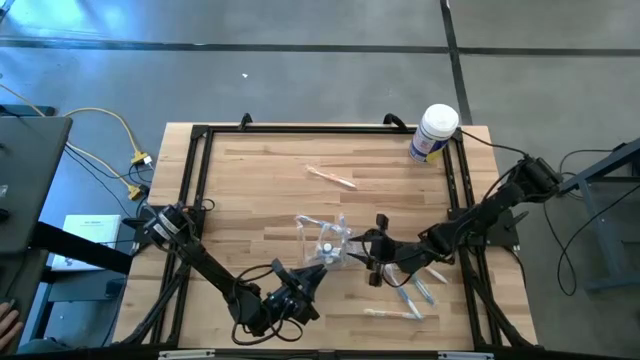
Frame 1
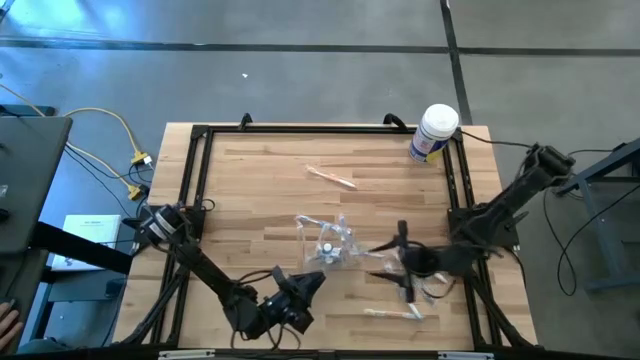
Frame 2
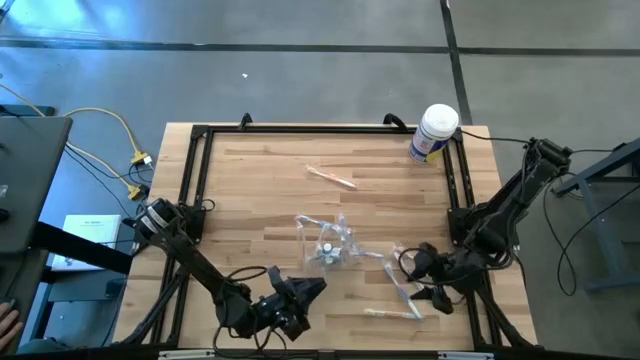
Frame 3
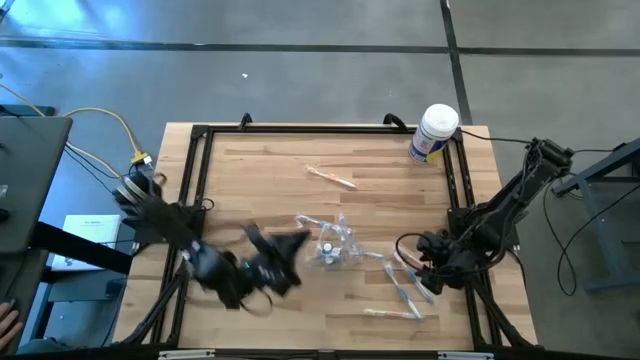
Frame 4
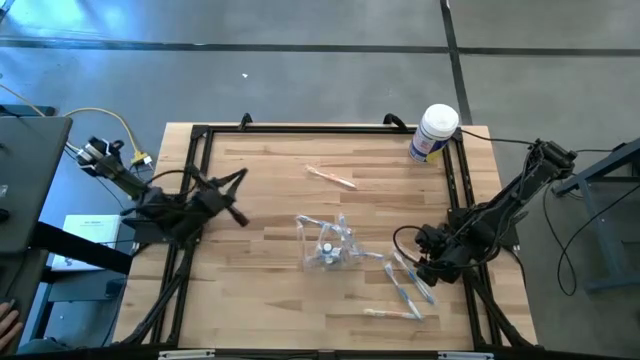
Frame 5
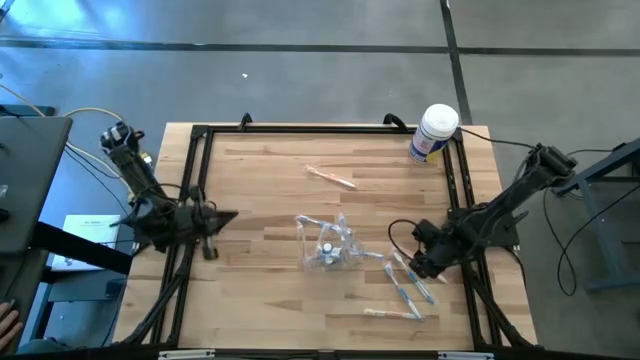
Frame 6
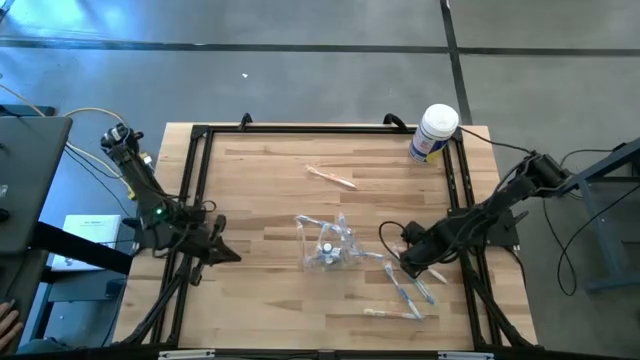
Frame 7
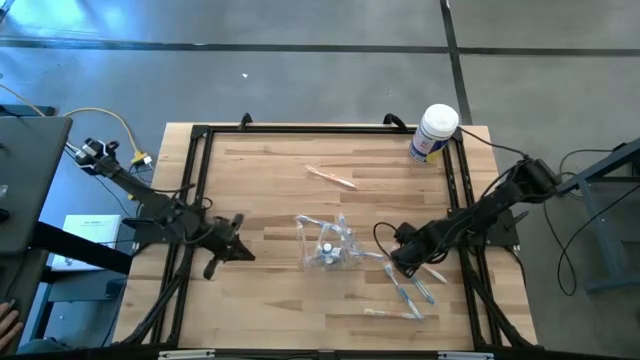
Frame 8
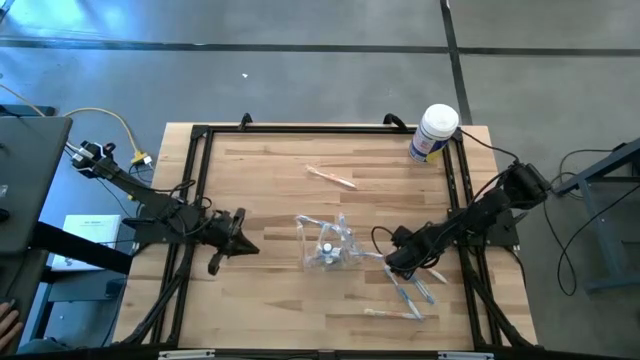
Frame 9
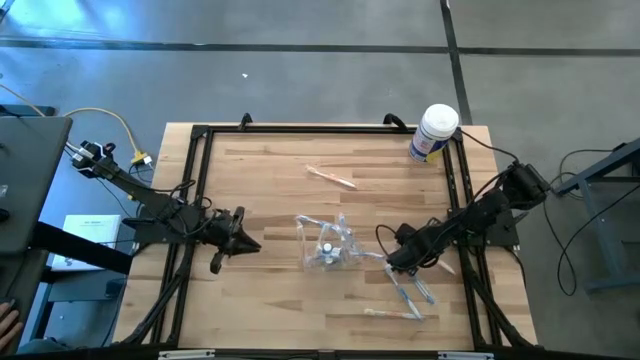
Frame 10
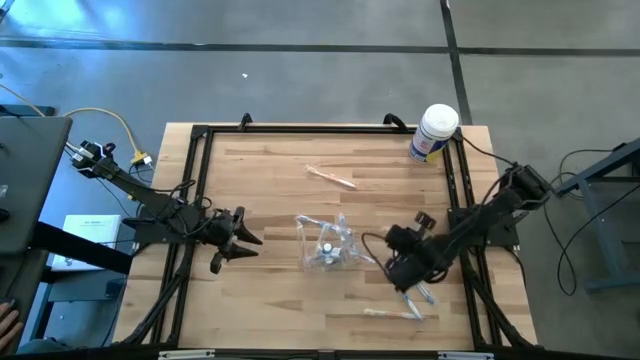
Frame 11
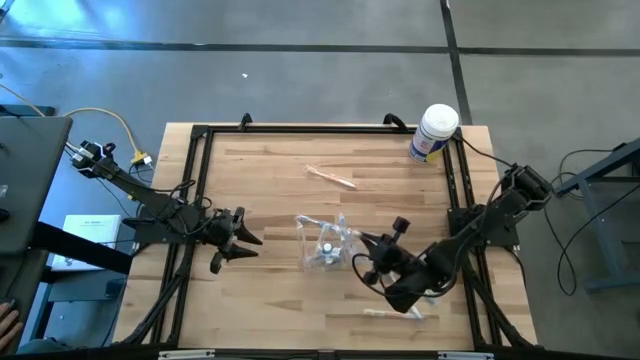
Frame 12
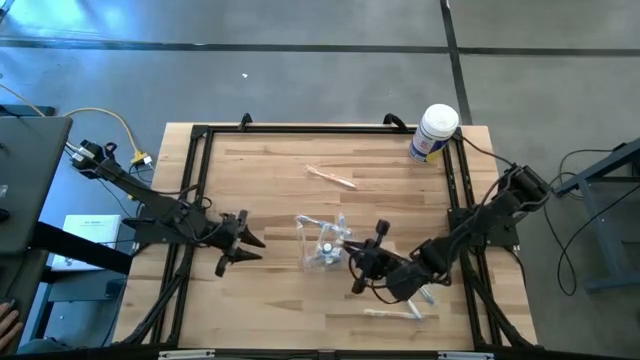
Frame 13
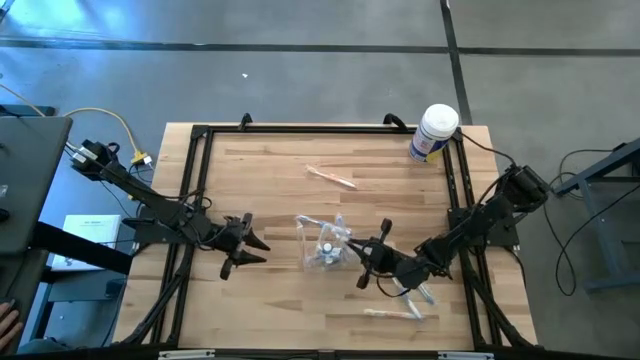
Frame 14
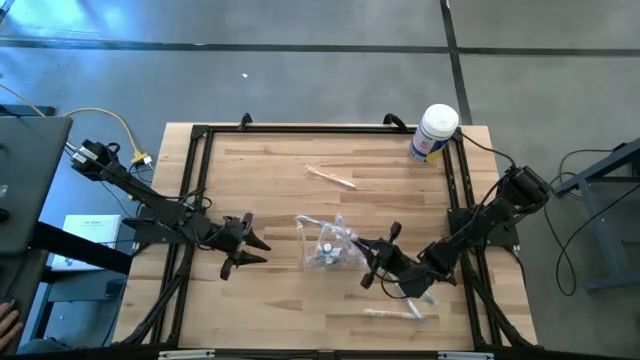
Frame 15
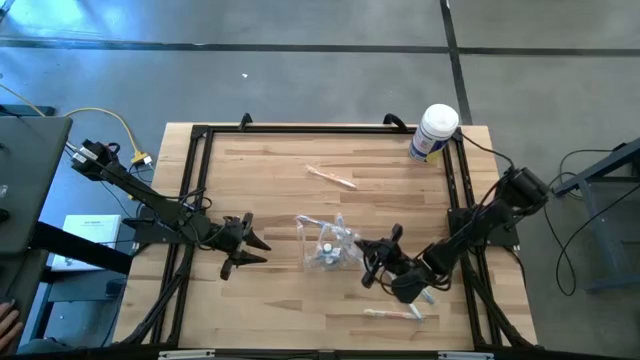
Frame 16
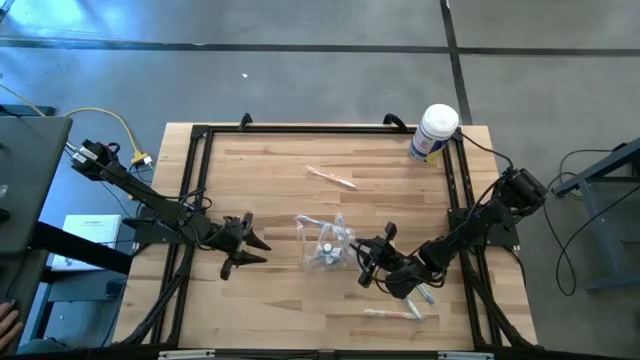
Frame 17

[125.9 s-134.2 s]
Task: Pick & Place toothbrushing station
Put the orange toothbrush into the transparent organizer

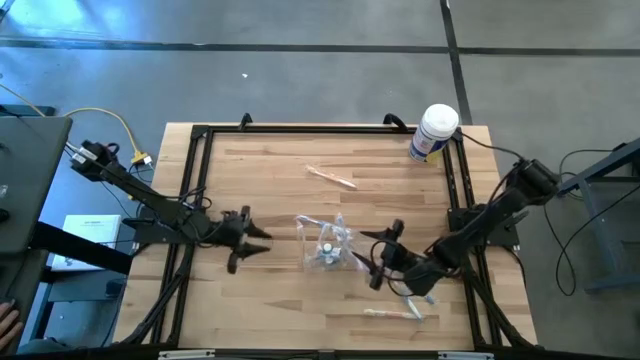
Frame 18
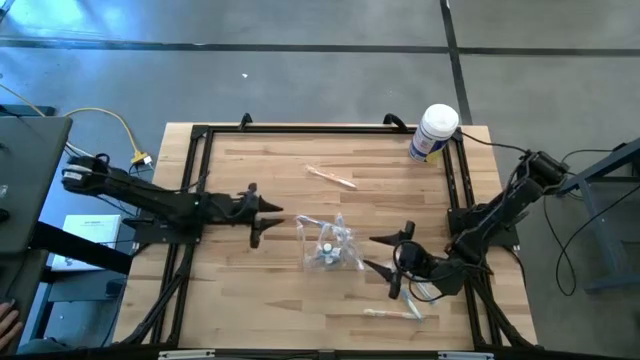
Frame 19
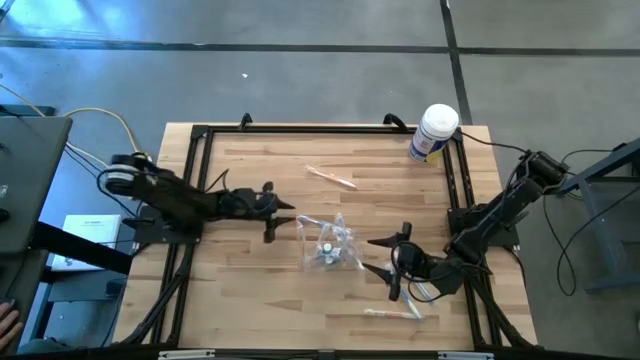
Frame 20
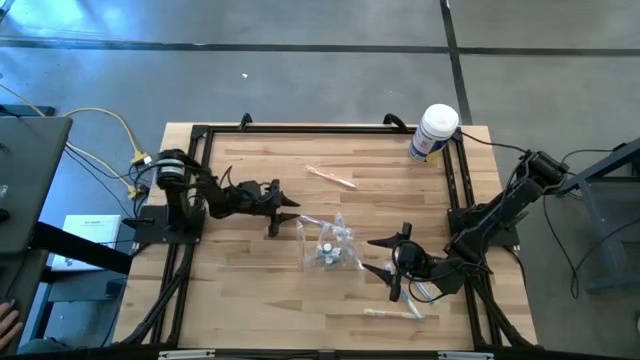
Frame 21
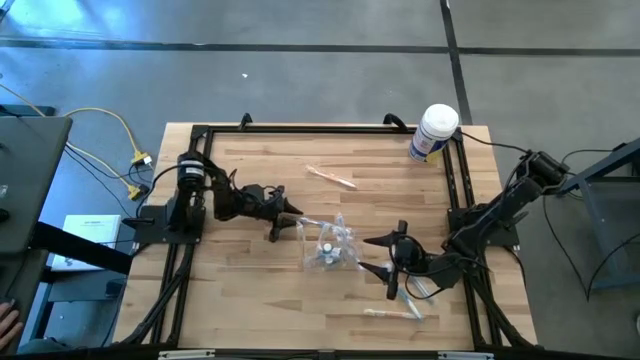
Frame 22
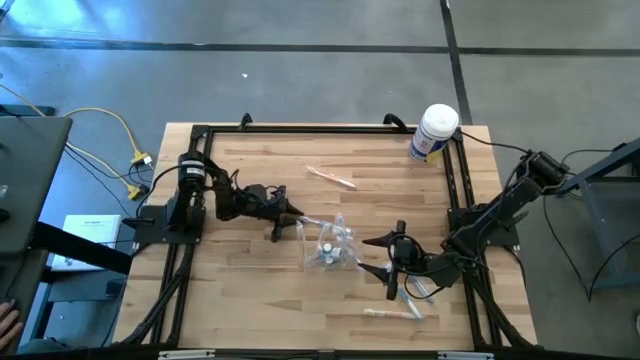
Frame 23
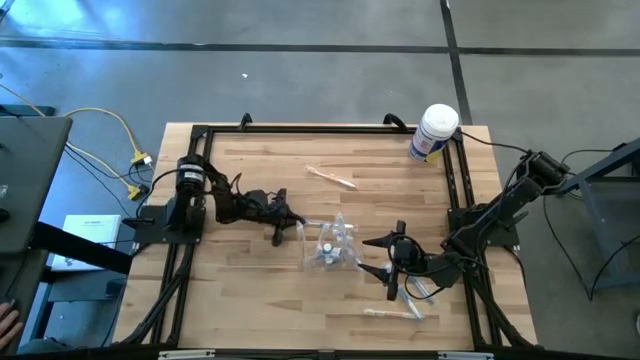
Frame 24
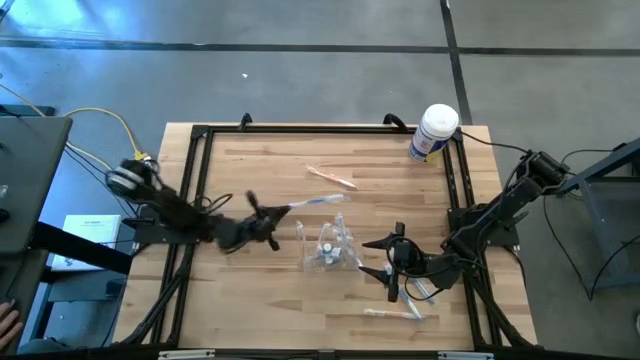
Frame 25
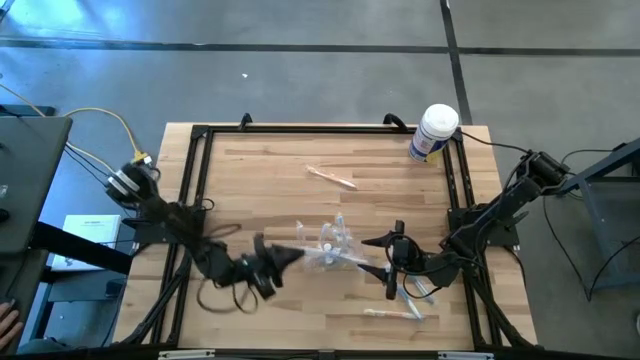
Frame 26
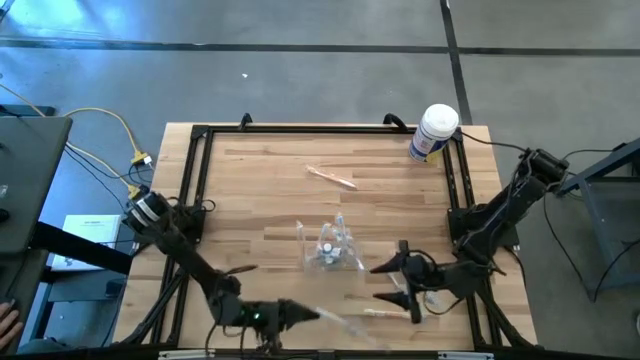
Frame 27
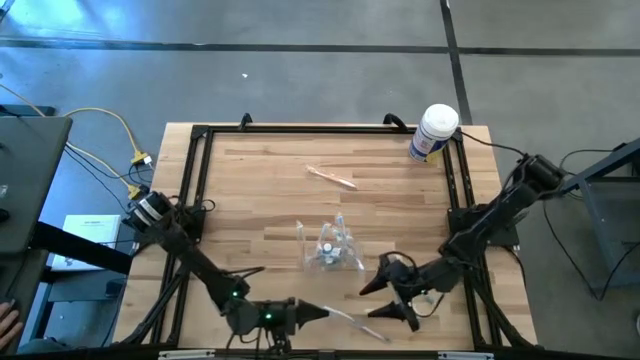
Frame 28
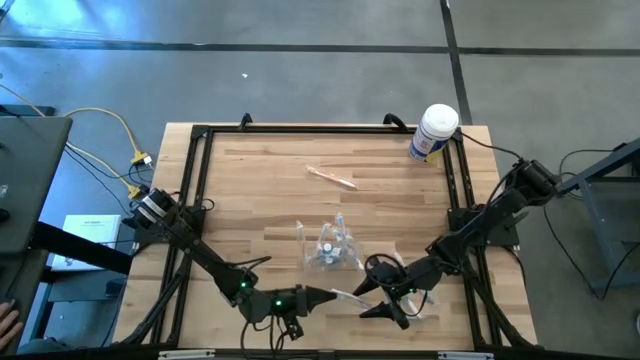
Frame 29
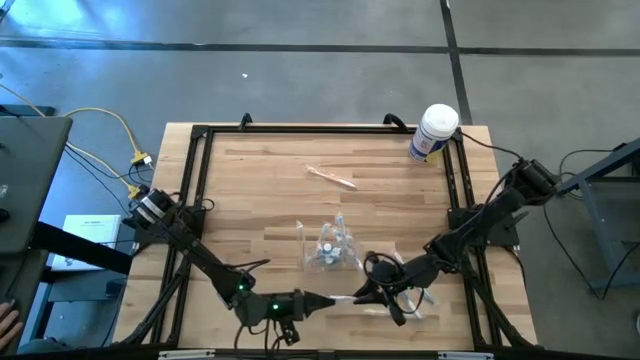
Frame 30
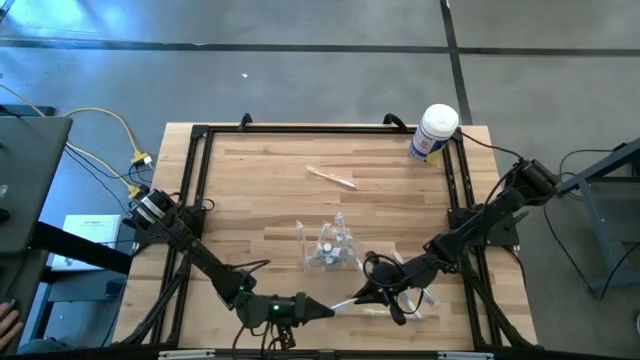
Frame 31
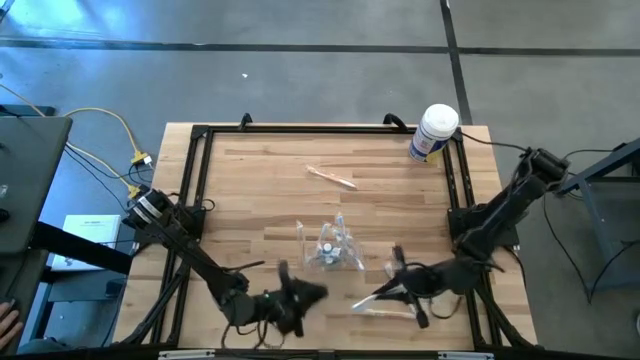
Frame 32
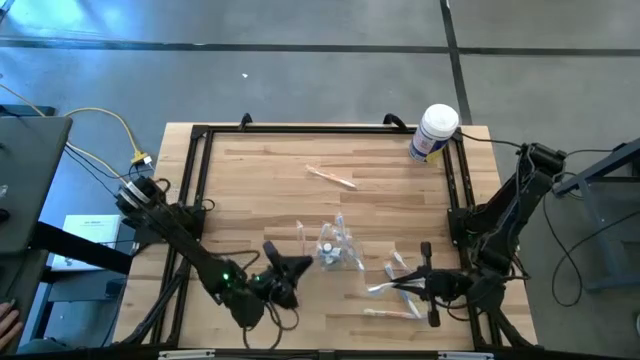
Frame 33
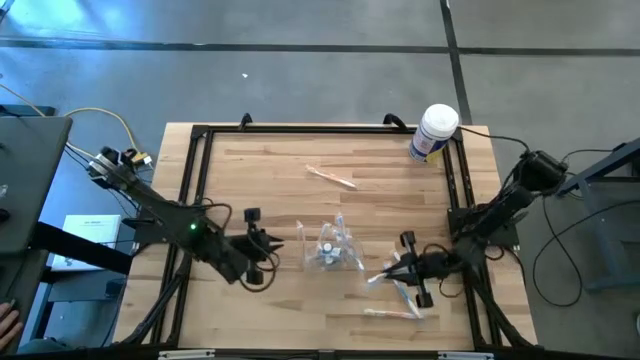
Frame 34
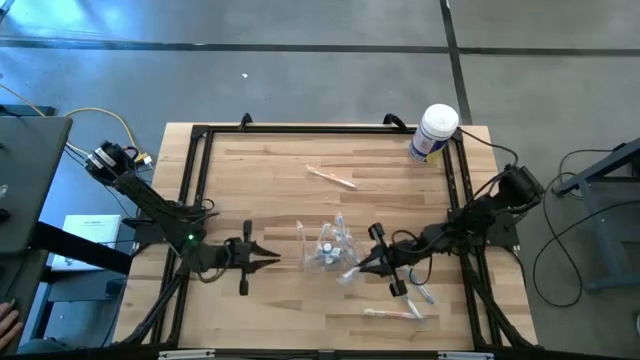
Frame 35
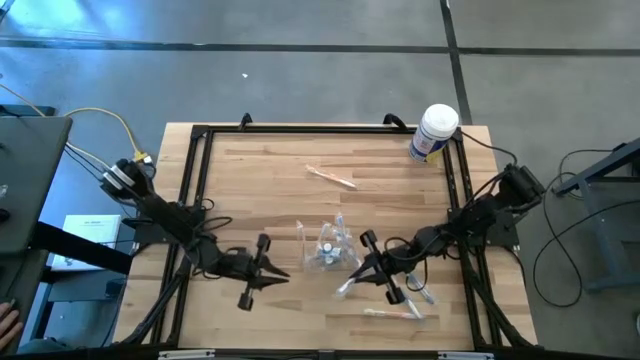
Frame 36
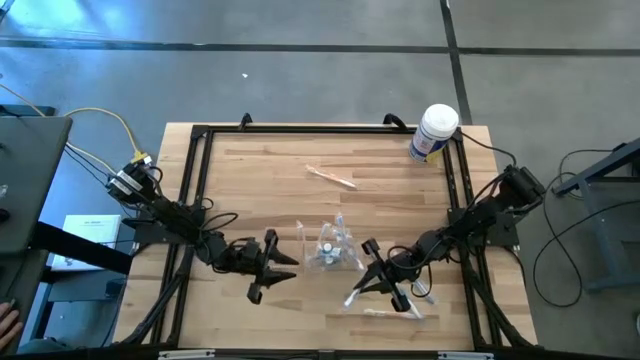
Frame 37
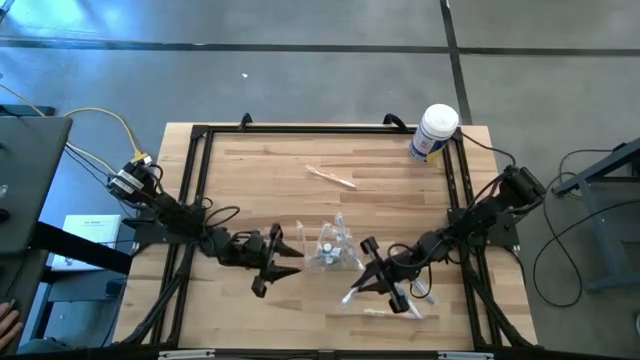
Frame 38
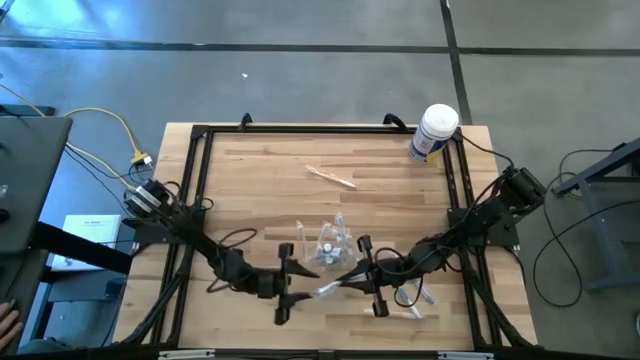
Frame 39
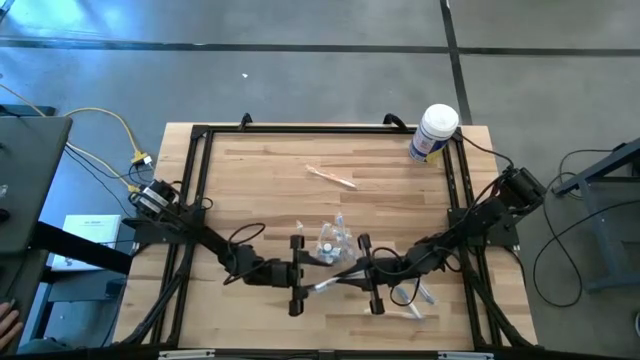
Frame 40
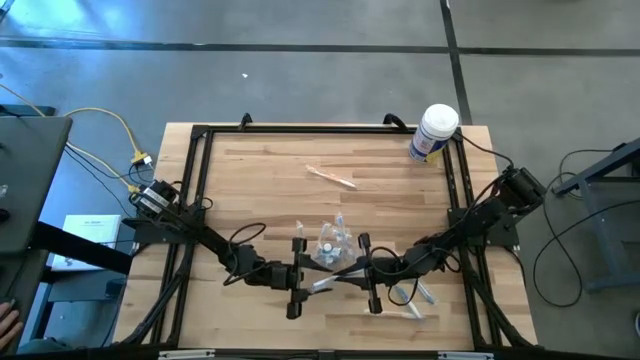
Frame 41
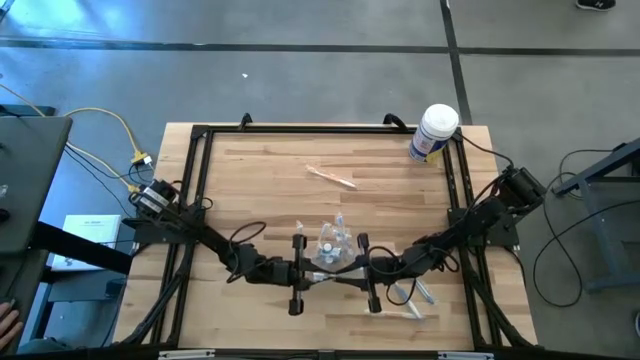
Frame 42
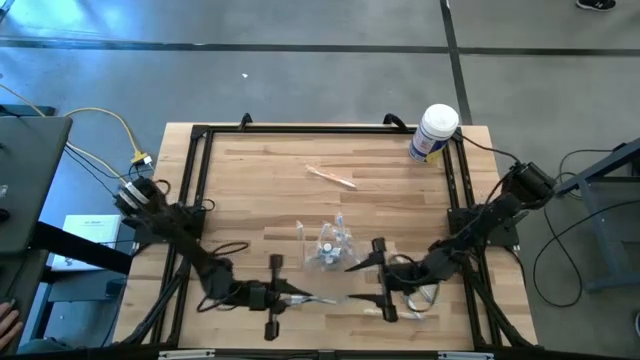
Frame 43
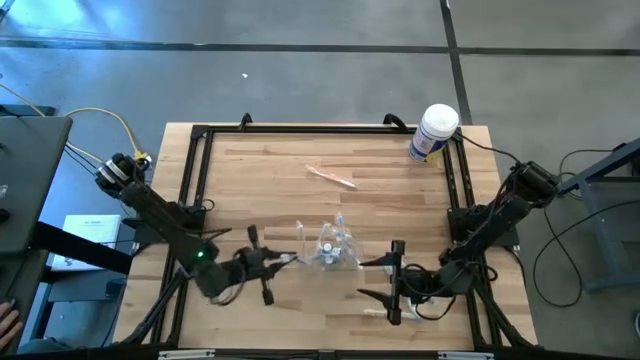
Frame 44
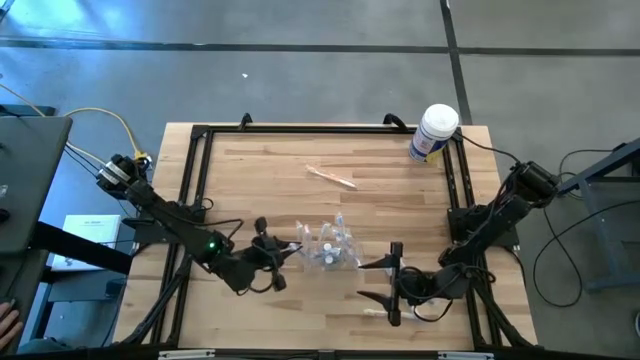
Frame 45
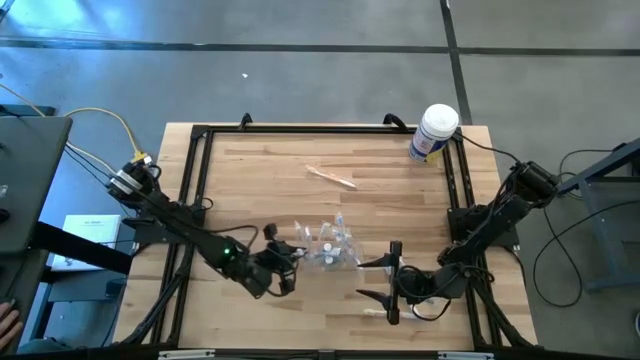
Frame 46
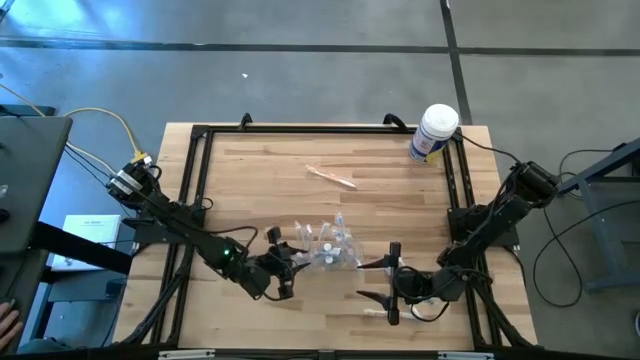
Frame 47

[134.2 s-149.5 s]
Put the blue toothbrush into the transparent organizer
